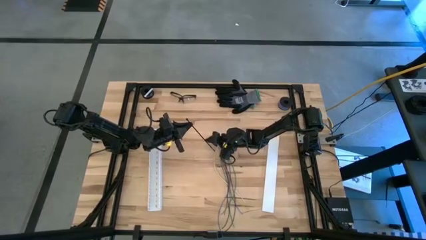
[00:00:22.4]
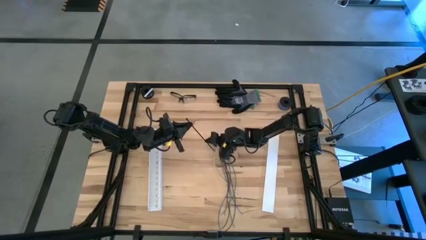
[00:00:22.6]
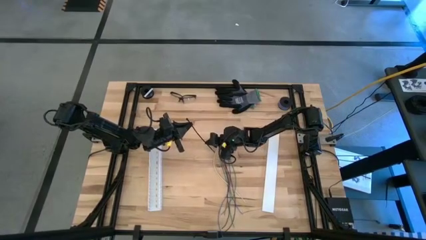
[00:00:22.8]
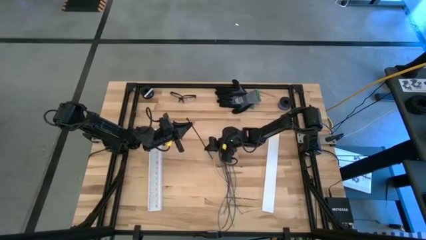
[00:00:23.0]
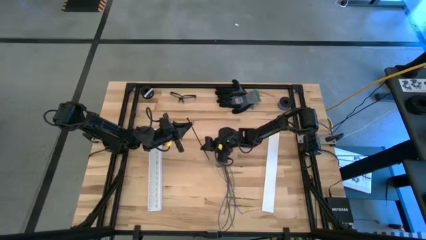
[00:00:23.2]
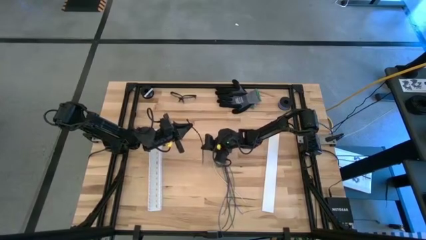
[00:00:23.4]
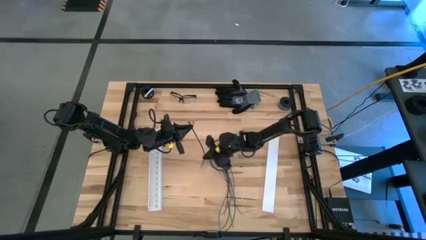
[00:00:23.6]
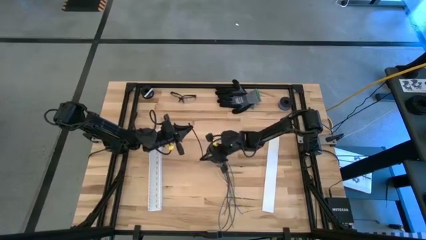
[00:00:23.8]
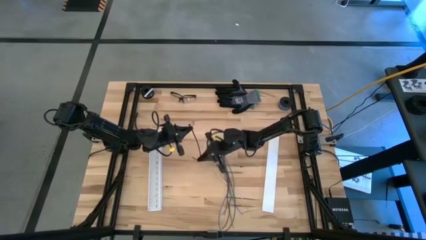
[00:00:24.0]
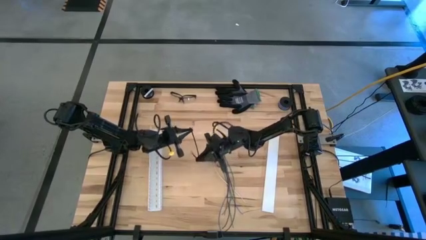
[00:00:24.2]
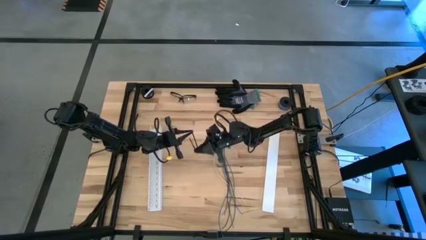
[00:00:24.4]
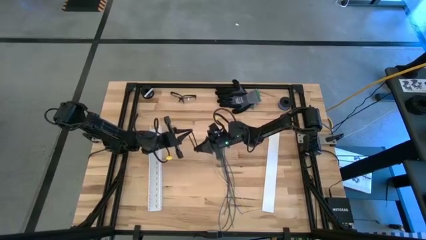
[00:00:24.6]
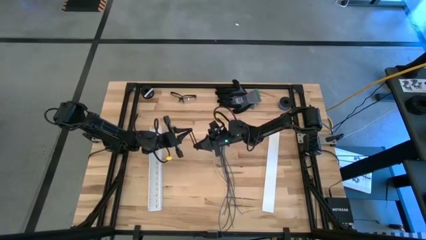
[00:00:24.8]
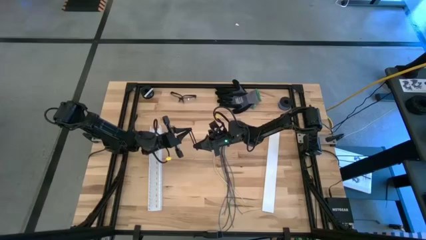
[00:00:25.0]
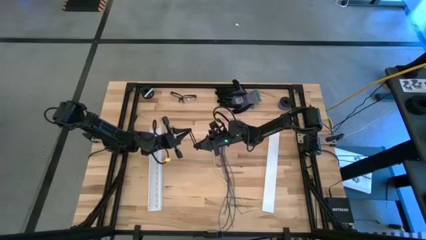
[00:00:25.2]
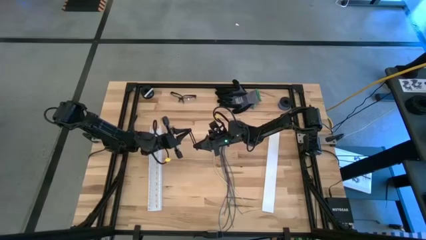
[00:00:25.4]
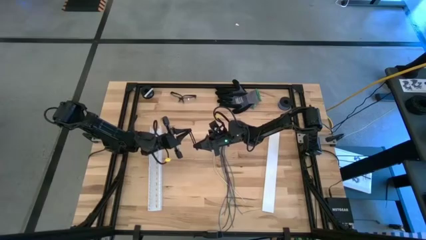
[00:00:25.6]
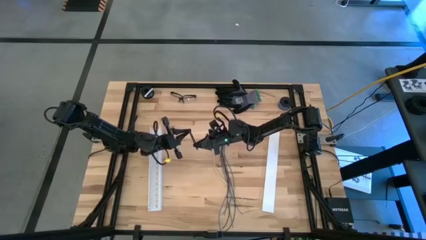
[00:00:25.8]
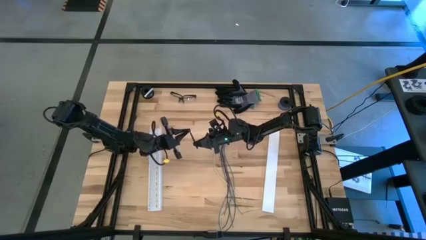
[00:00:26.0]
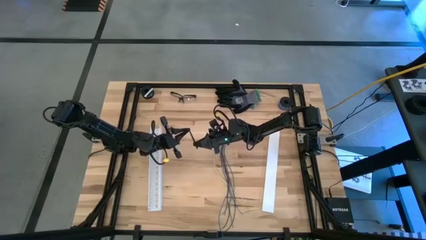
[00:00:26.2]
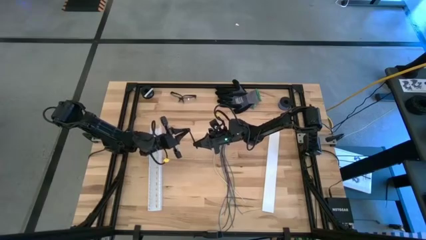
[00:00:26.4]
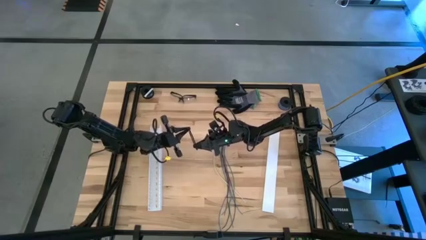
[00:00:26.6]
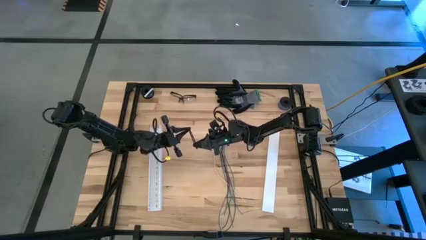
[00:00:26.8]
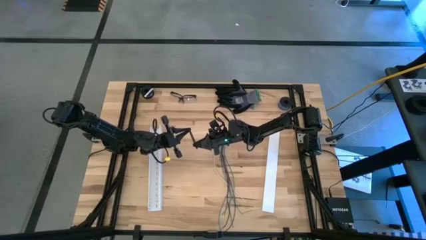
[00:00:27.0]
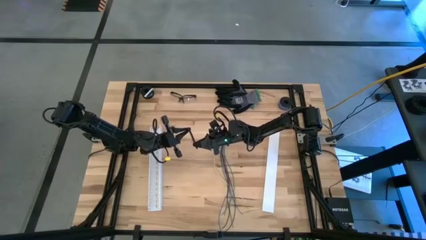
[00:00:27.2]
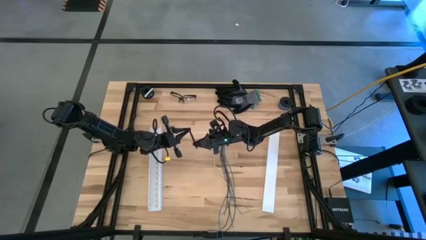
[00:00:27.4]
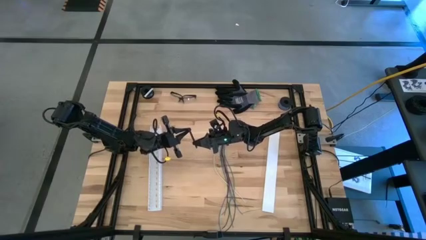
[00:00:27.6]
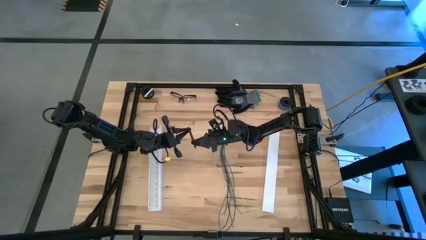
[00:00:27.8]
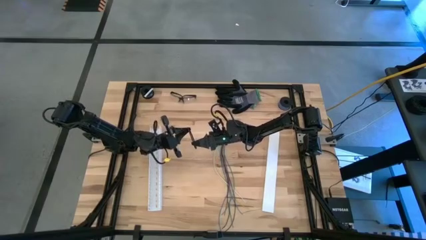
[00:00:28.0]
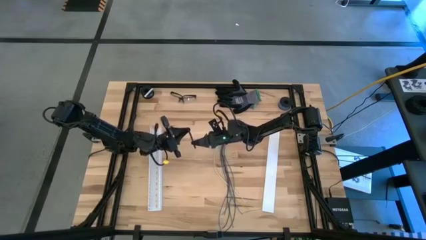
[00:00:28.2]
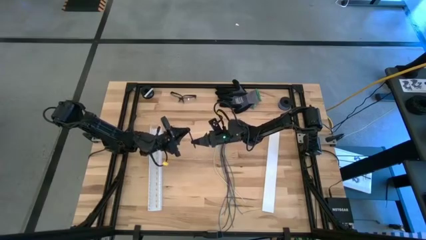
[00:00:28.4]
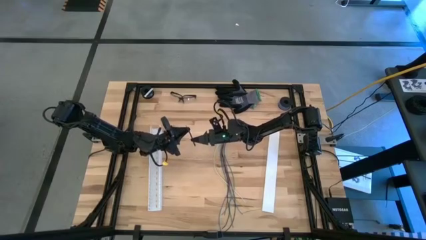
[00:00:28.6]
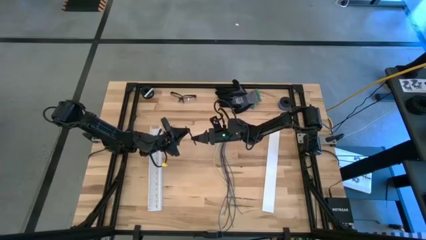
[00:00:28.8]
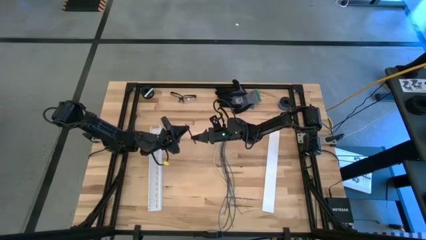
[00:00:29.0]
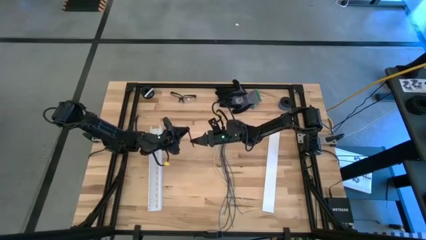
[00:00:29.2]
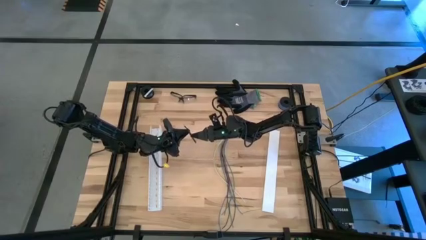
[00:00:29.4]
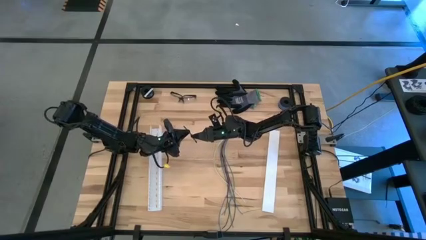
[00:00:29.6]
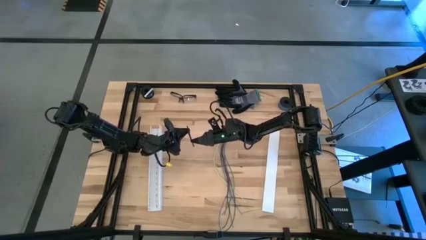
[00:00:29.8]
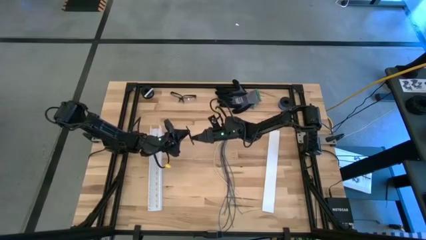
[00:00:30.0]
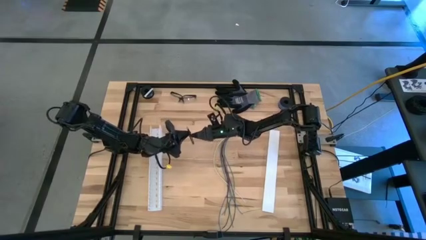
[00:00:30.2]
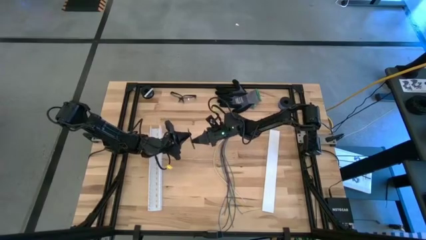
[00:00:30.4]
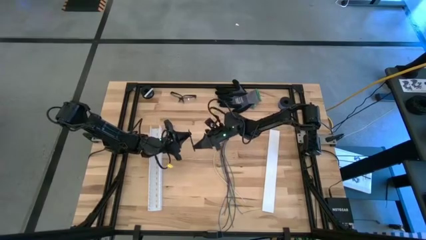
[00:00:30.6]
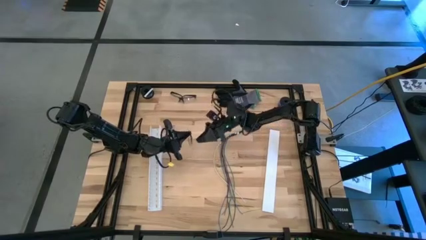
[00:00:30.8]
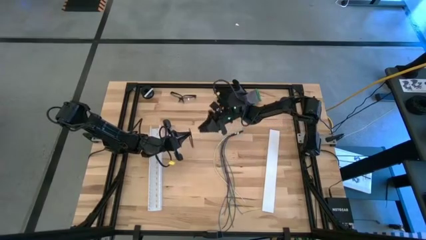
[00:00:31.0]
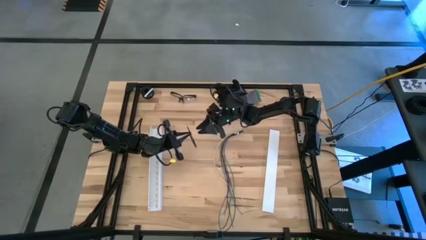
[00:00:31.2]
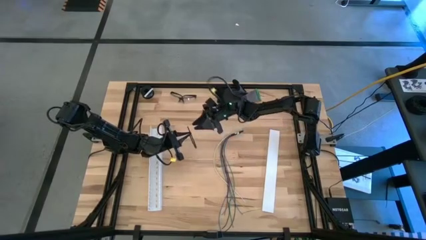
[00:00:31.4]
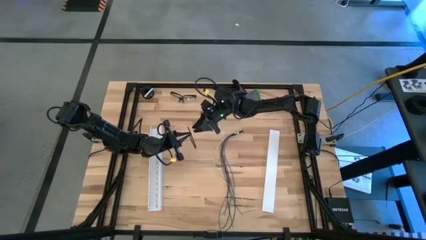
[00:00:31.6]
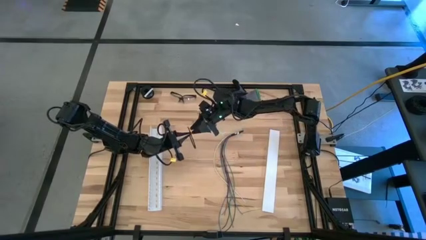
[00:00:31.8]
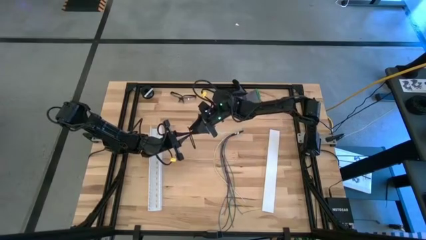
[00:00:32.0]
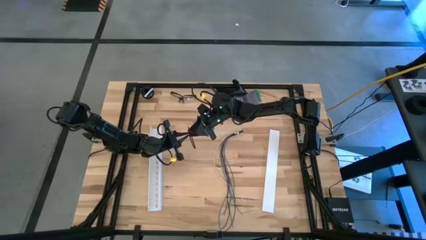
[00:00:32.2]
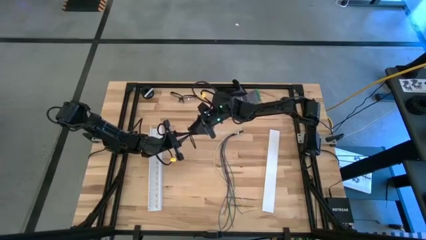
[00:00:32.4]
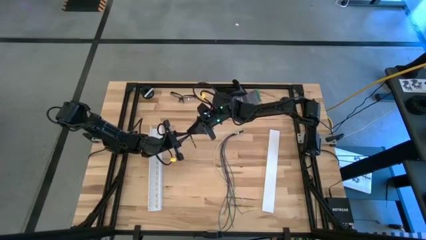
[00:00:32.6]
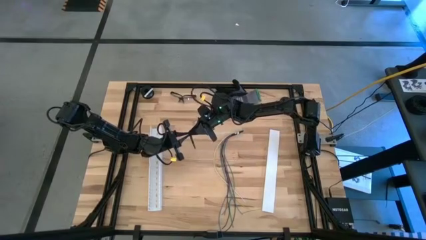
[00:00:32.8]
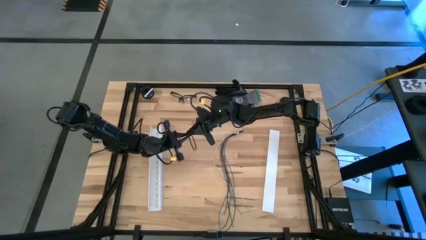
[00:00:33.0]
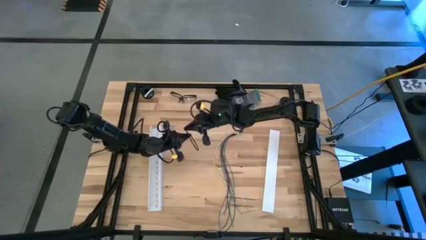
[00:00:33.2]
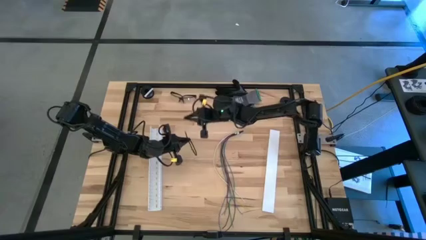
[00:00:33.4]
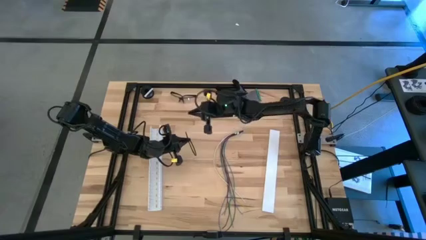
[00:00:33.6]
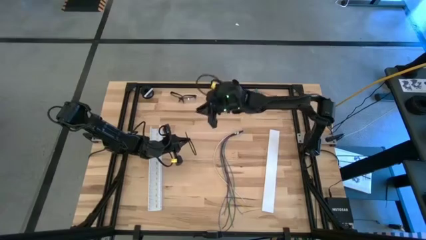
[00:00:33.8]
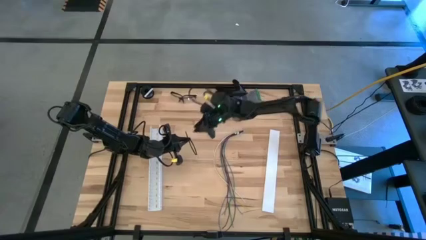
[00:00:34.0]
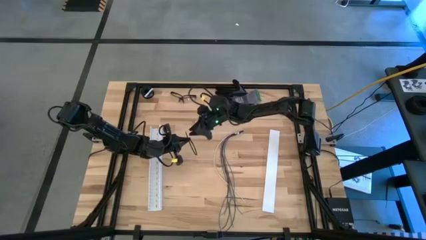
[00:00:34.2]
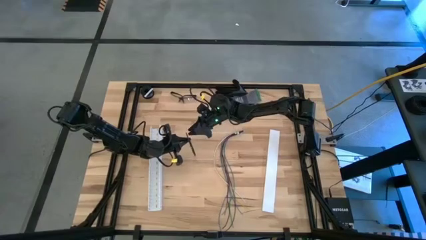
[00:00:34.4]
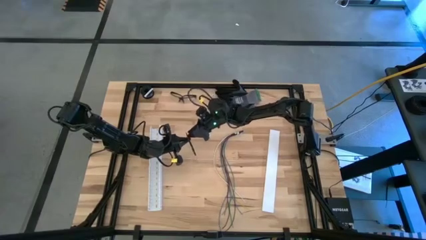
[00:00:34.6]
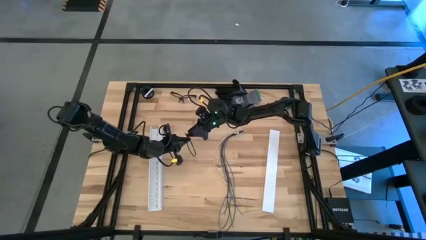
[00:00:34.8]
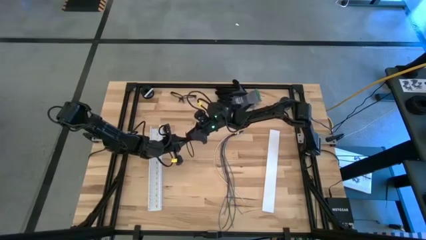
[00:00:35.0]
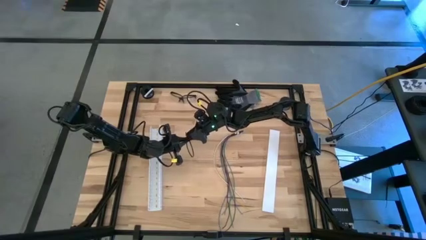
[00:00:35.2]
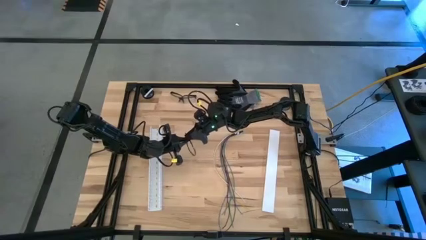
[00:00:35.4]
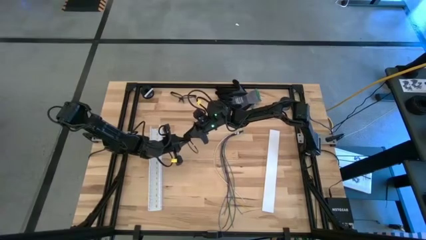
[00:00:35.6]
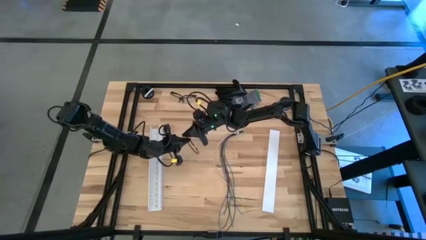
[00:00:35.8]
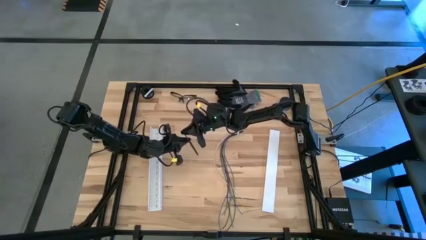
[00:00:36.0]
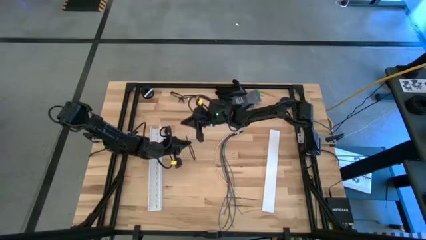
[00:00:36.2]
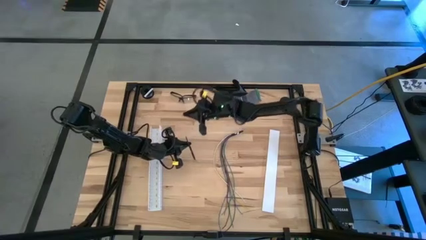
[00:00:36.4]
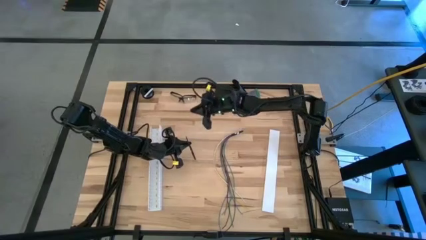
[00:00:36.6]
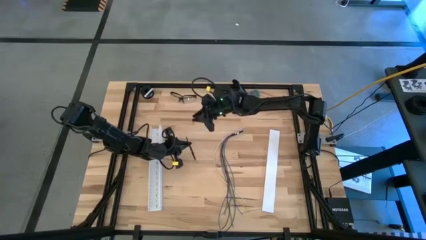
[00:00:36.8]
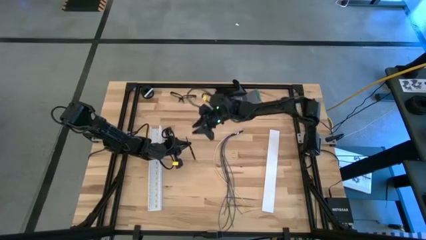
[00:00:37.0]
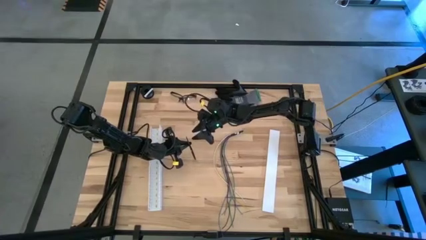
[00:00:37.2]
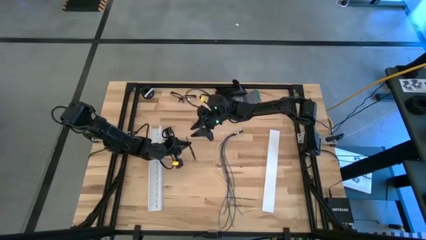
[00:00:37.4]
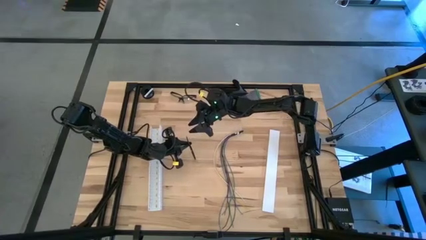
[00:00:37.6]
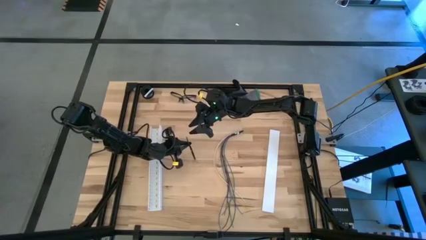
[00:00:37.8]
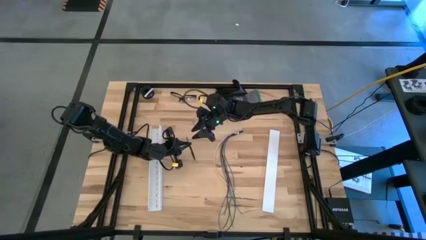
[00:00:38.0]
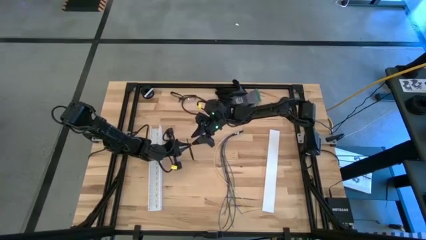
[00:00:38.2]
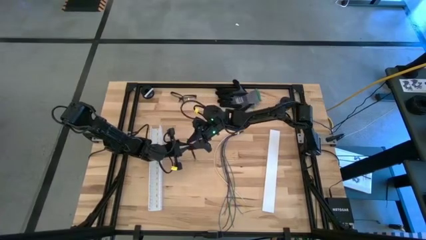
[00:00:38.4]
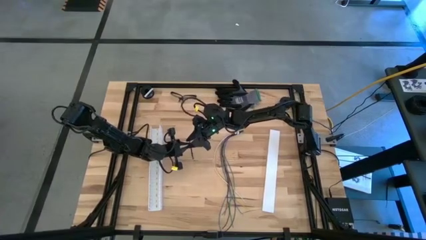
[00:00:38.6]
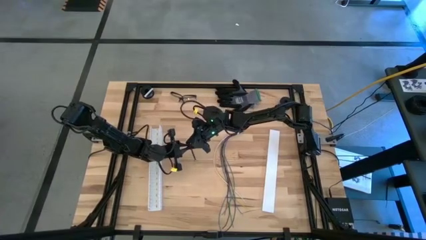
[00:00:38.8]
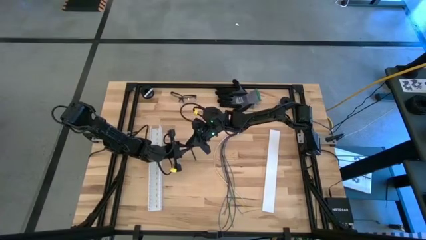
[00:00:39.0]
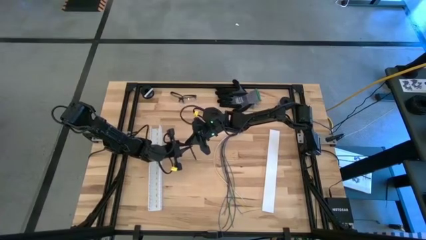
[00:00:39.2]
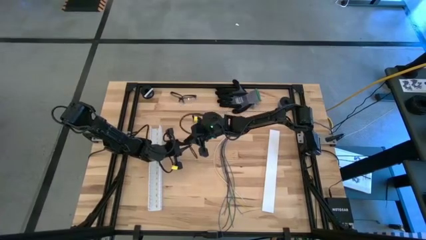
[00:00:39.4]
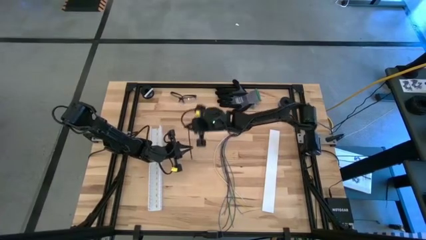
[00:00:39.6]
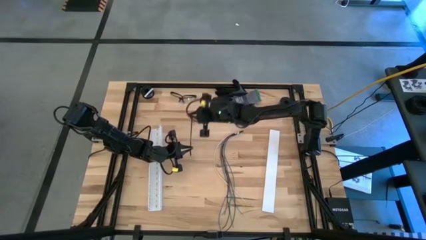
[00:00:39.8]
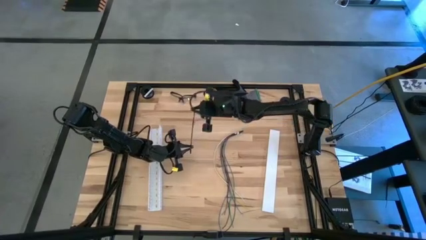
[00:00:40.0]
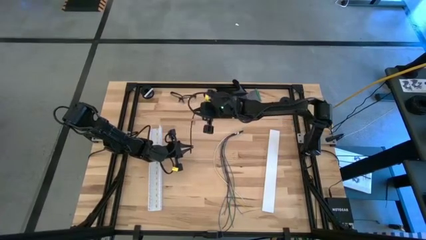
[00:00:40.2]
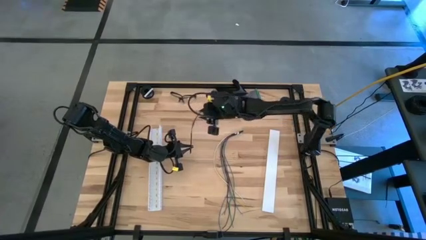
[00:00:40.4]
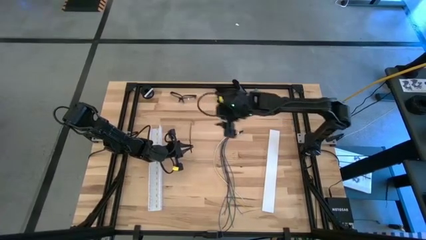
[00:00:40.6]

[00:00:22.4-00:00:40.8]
Task: Ziptie cables
Close the zip tie
